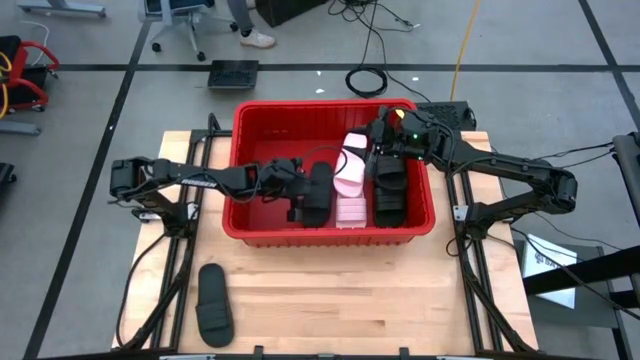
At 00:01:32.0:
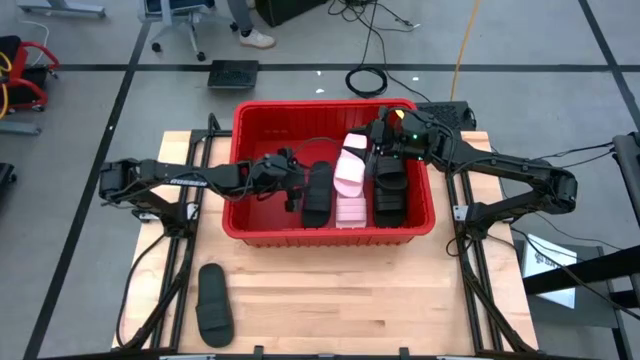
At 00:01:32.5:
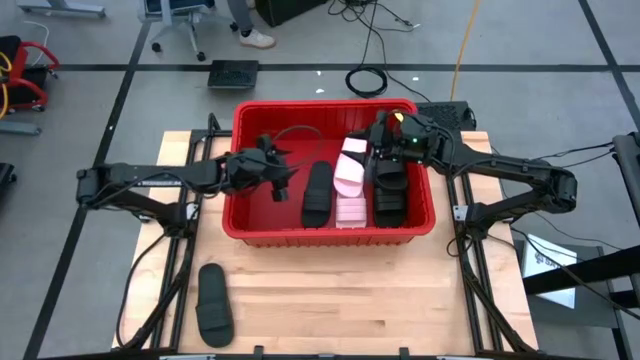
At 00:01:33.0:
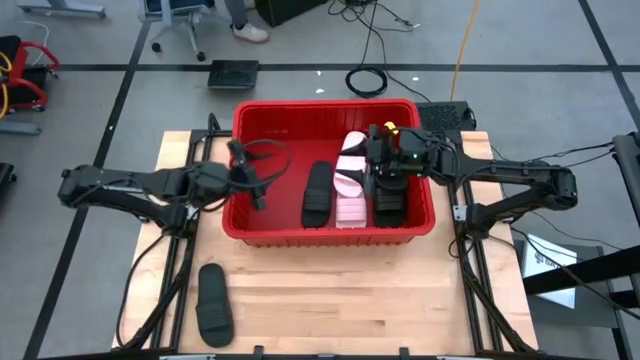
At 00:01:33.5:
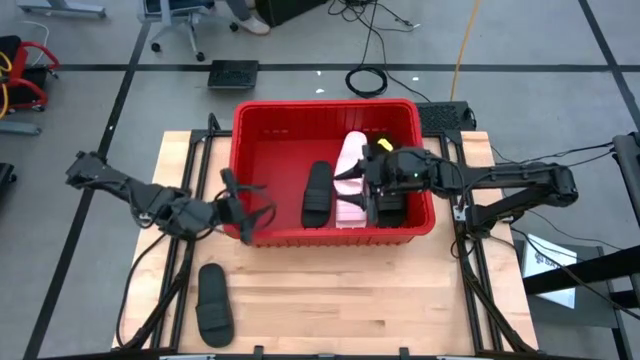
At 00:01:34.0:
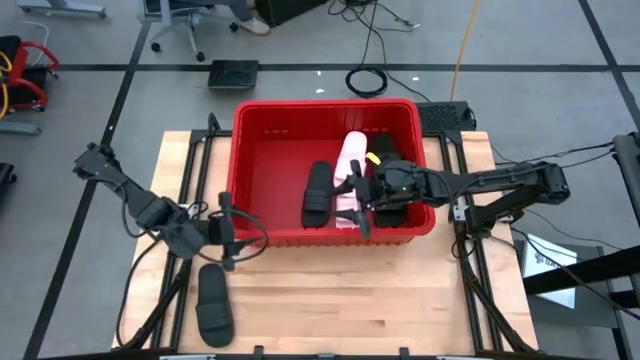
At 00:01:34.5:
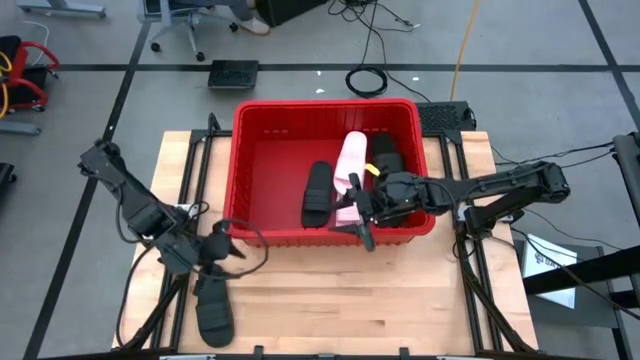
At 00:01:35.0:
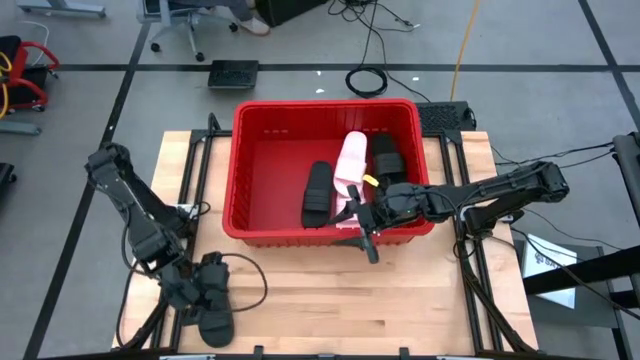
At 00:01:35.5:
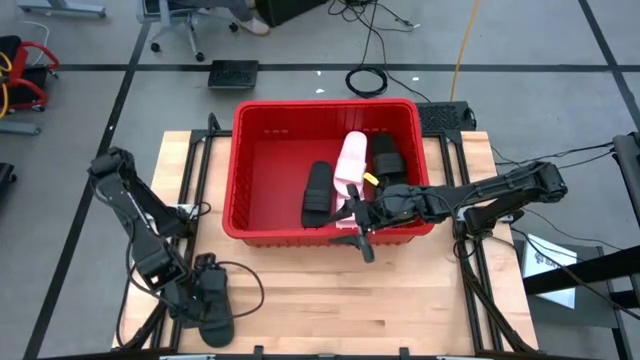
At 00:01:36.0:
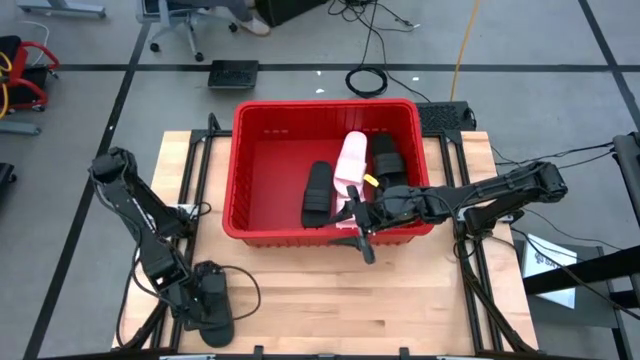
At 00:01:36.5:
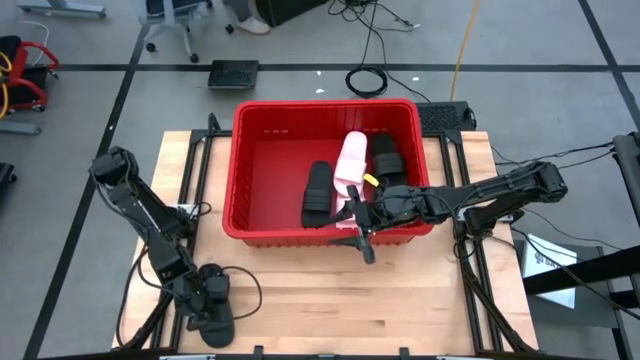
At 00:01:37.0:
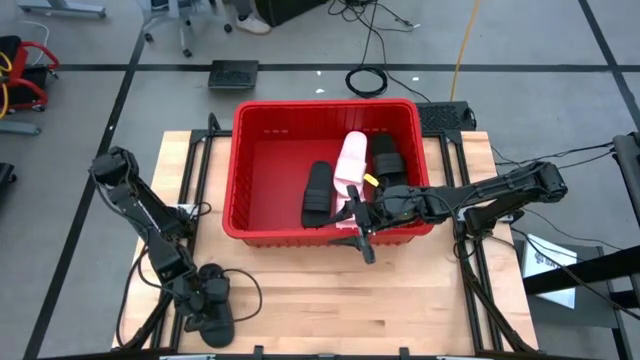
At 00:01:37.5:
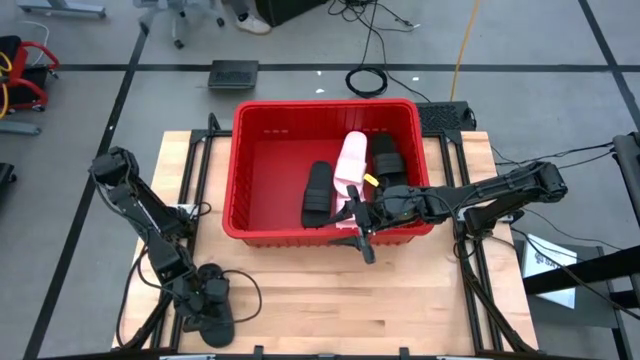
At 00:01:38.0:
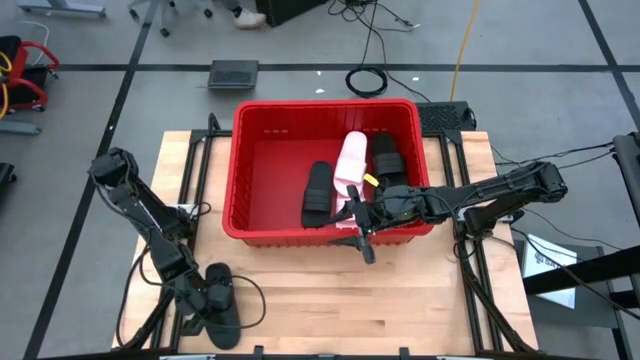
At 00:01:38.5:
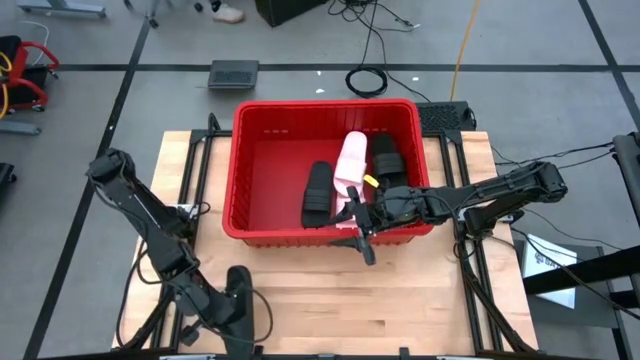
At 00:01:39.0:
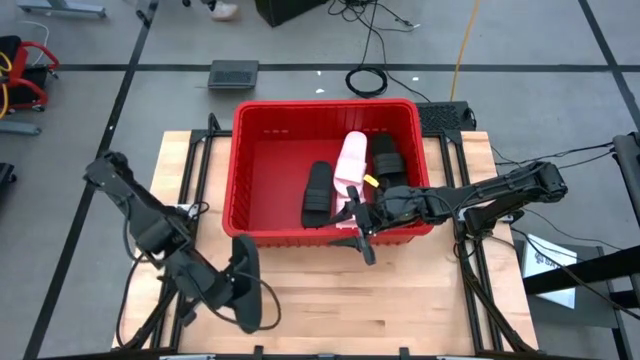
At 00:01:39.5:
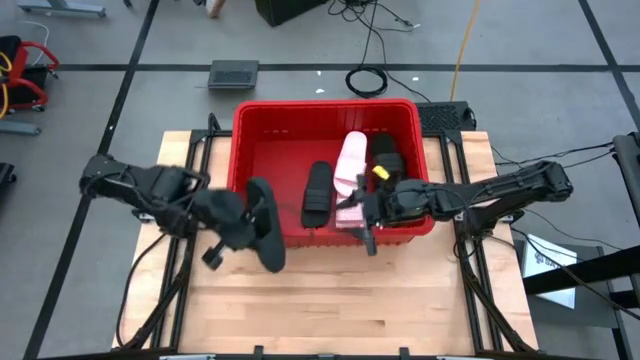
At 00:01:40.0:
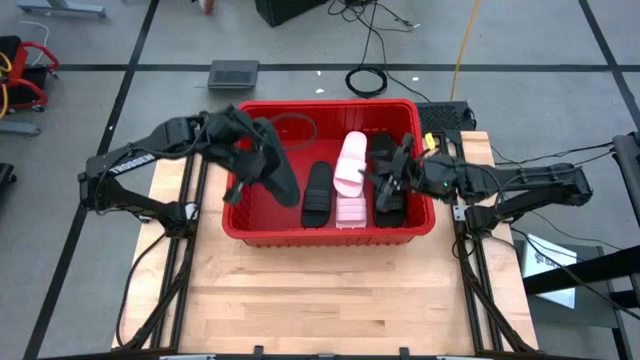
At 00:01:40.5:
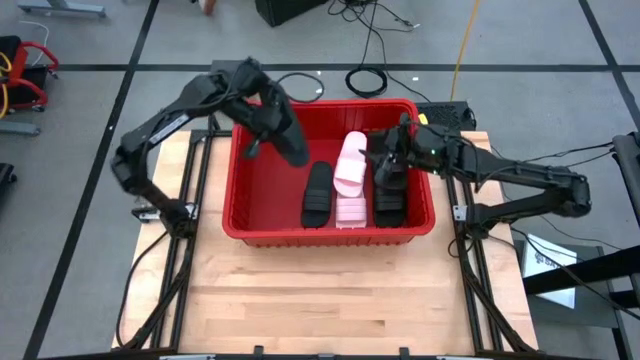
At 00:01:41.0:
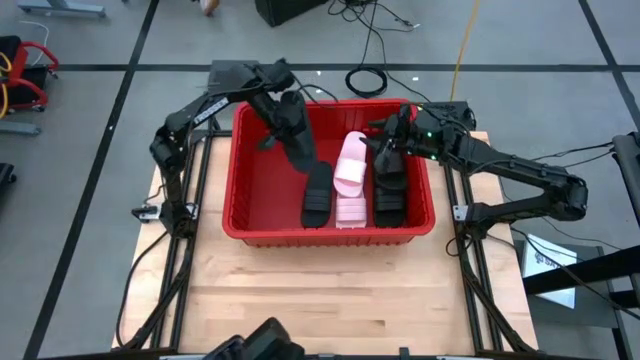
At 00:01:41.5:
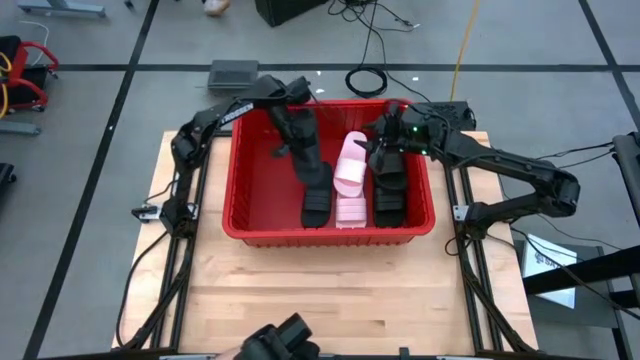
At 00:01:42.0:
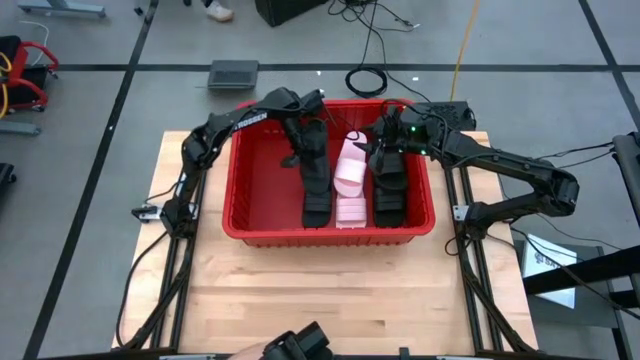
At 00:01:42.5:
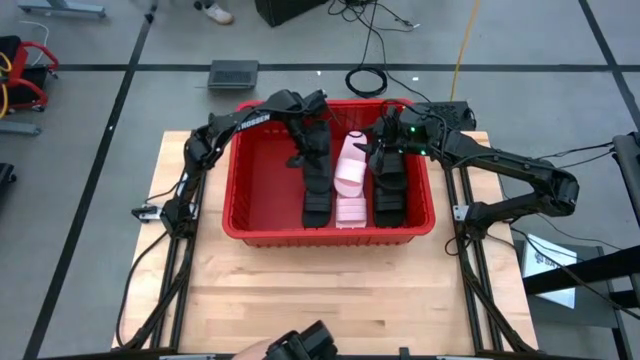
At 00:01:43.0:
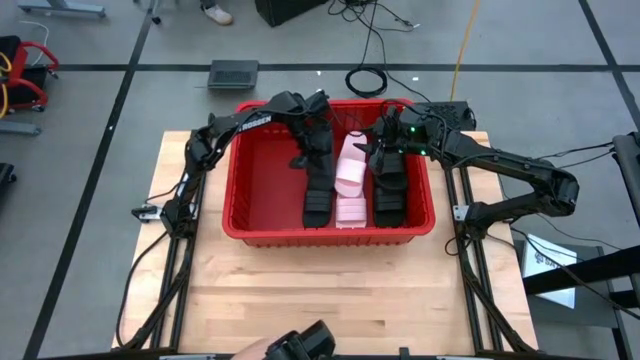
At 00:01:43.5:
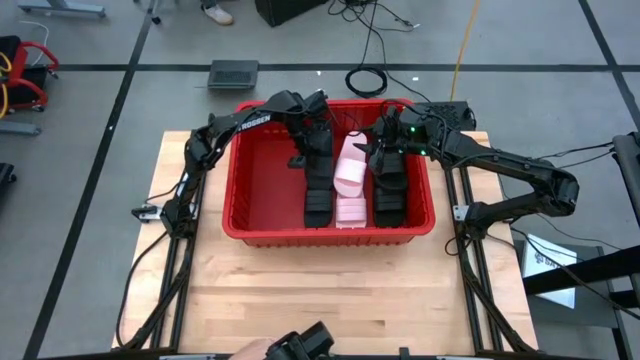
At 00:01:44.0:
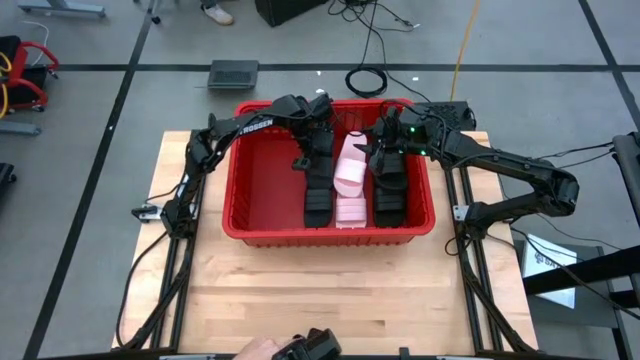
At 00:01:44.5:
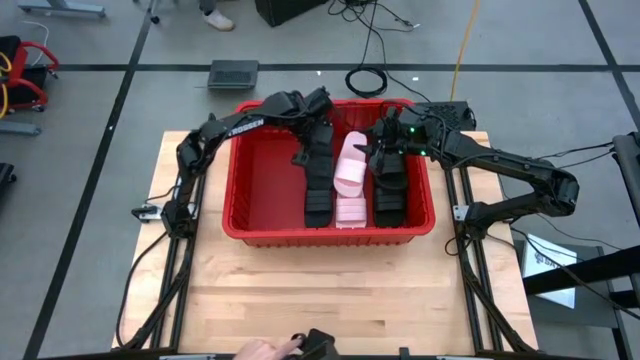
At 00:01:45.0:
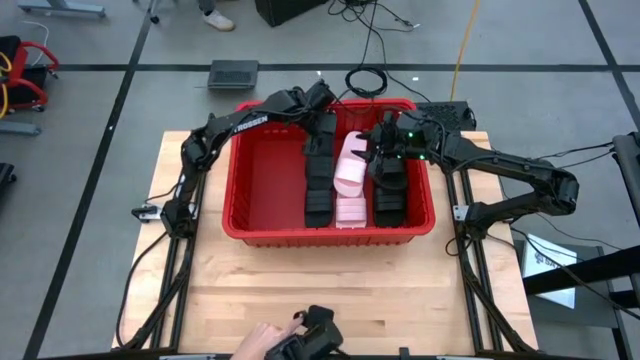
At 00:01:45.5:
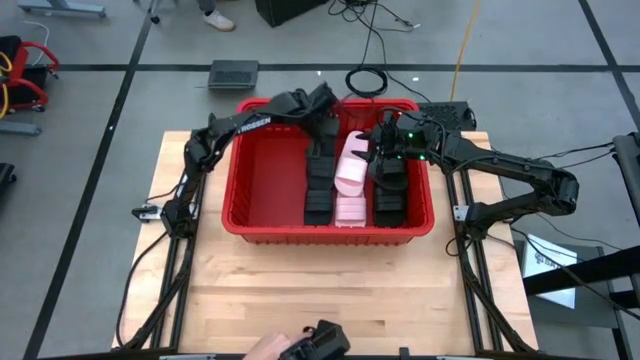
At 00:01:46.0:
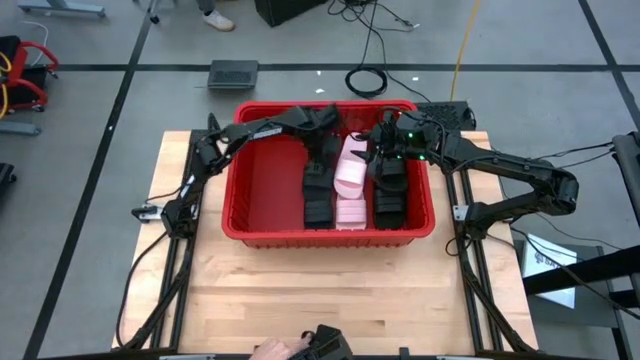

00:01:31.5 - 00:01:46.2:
Task: Pick and place slides into bin
Put the black slide into the red container

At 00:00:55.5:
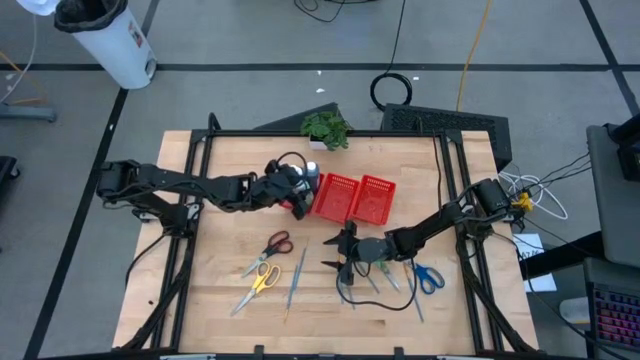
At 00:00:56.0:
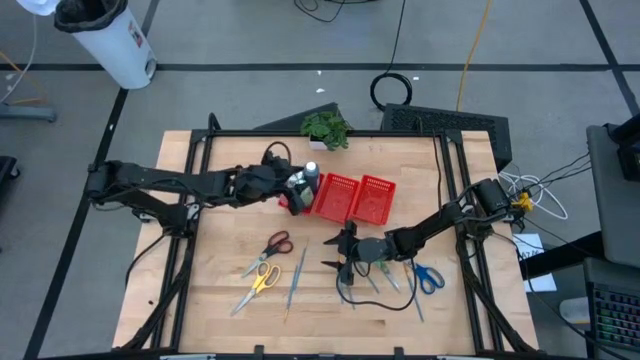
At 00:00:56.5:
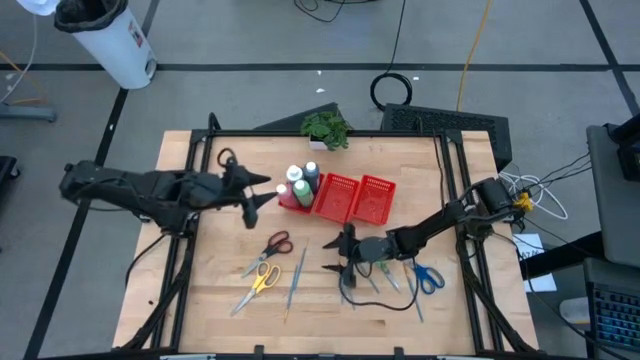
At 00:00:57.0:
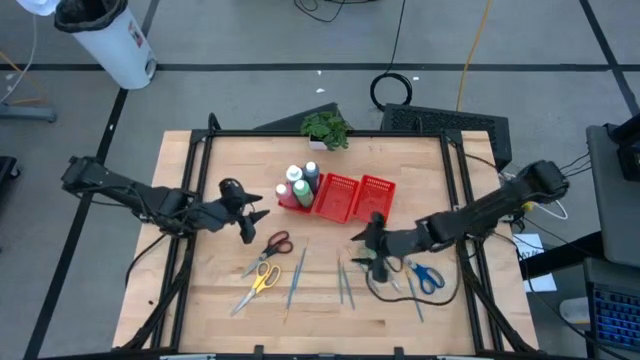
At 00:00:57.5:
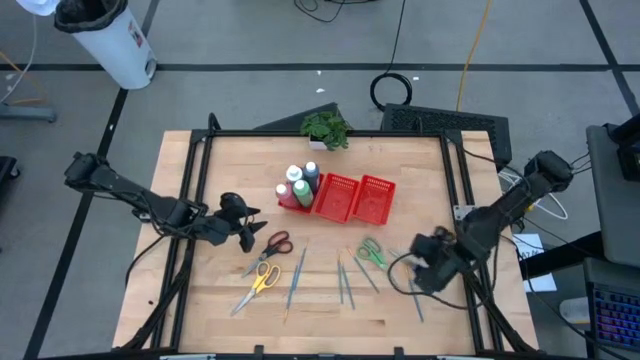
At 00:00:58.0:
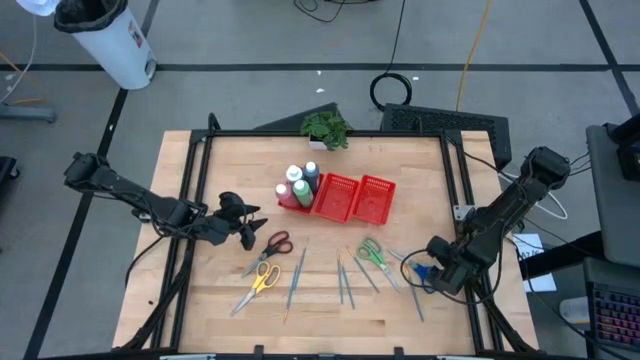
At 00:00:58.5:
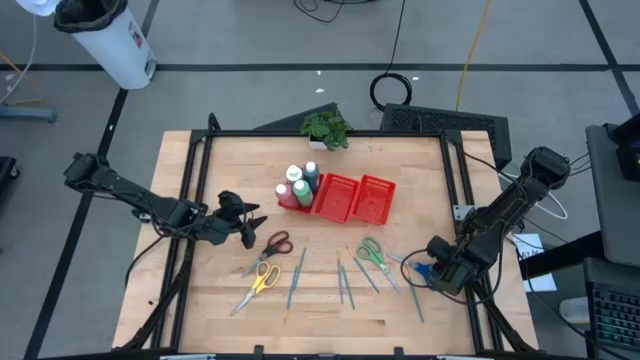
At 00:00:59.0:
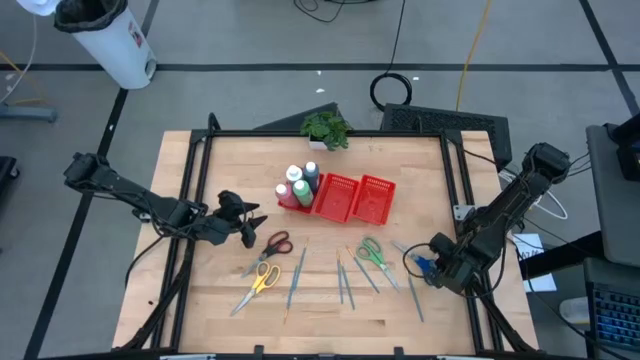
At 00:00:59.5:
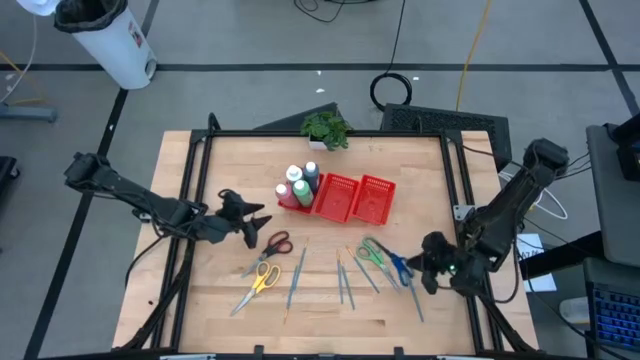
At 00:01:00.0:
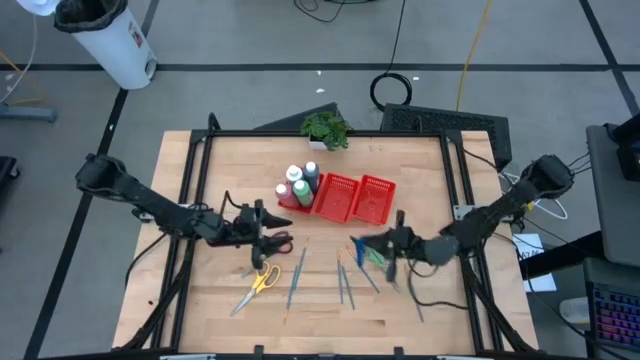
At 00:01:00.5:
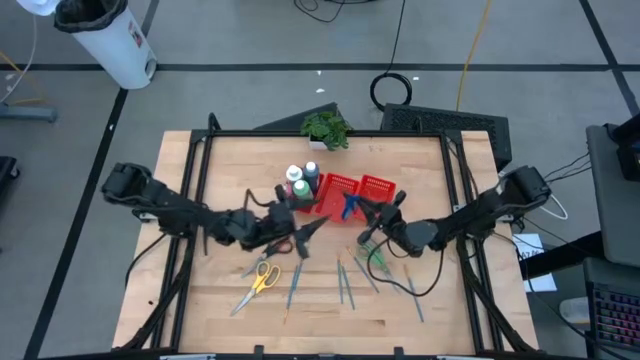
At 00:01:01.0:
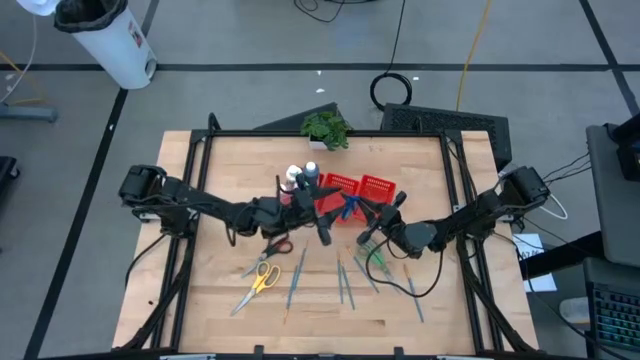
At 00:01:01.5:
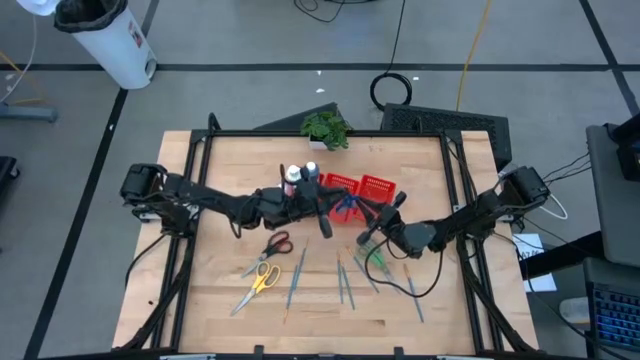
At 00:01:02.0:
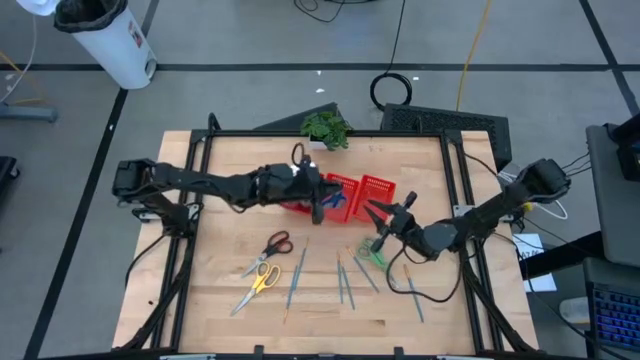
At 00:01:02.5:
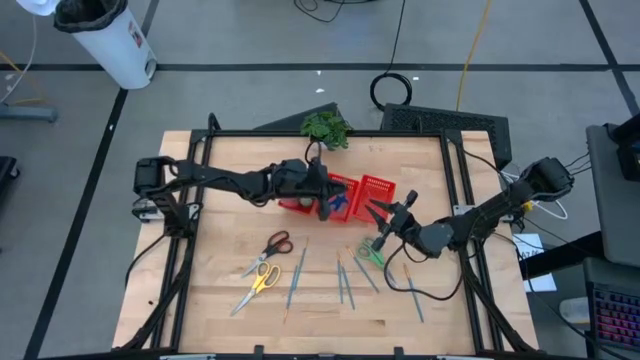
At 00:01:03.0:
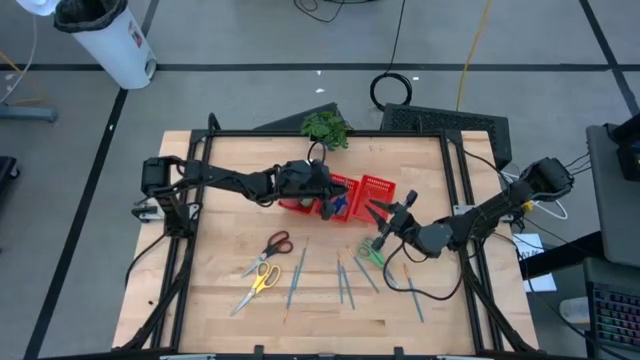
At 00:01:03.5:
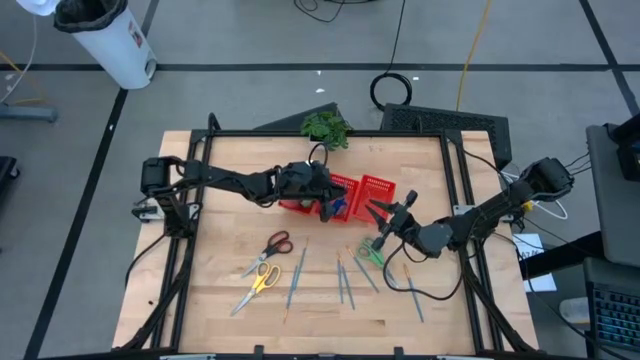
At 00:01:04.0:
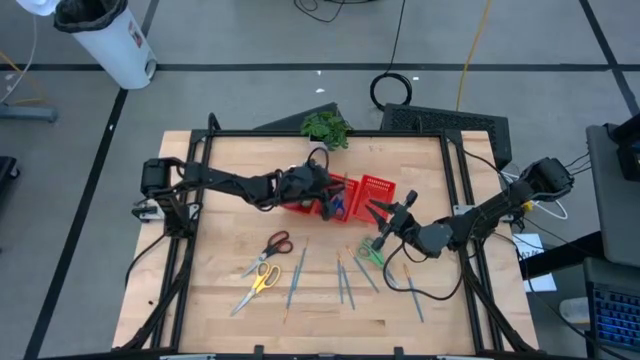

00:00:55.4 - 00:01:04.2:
Task: Pick & Place Paint Supplies
Put the blue scissors into the middle red bin
